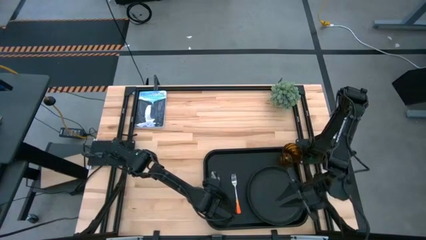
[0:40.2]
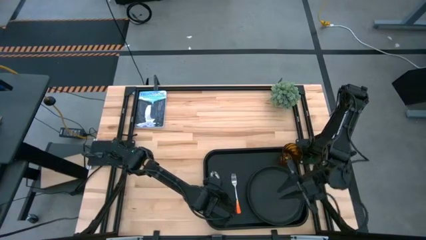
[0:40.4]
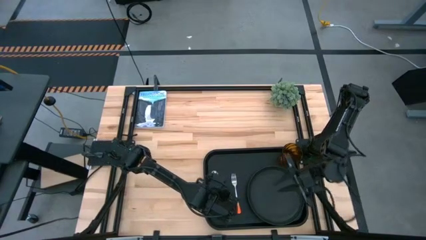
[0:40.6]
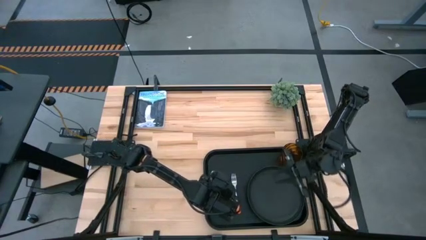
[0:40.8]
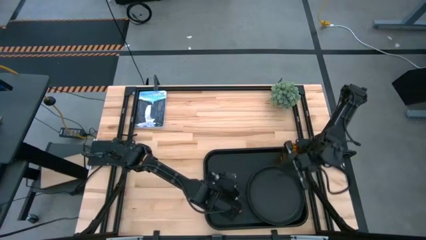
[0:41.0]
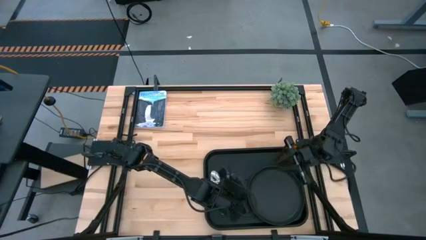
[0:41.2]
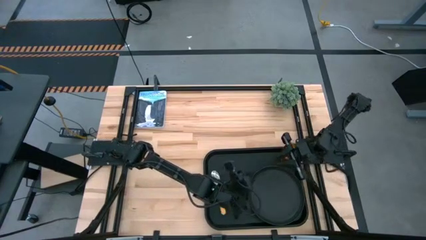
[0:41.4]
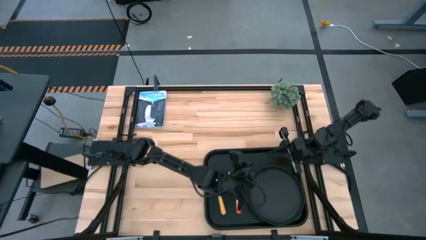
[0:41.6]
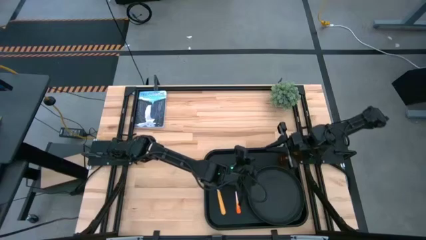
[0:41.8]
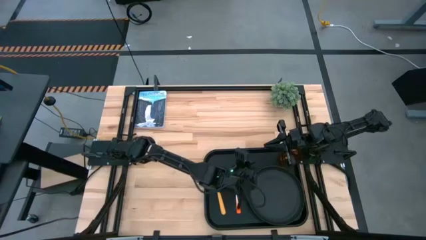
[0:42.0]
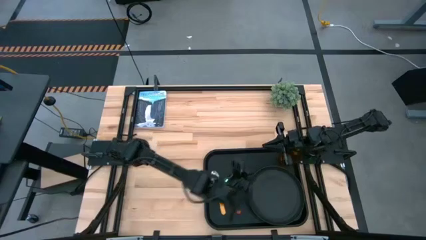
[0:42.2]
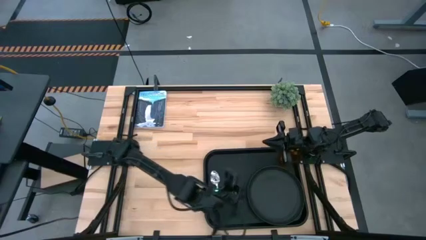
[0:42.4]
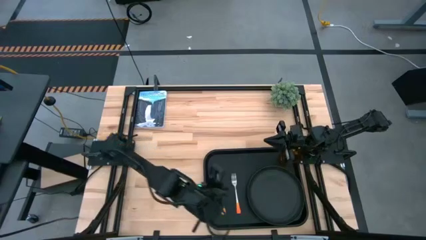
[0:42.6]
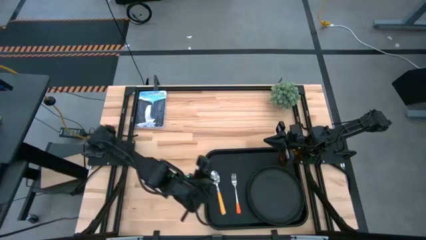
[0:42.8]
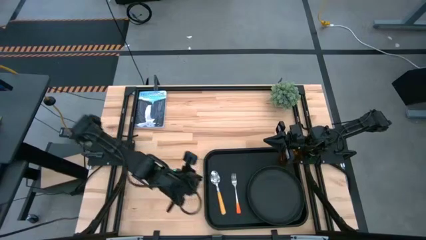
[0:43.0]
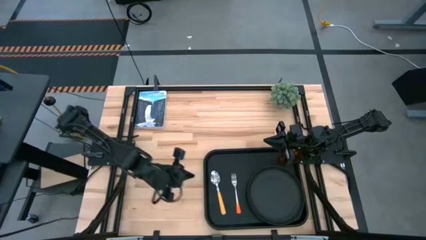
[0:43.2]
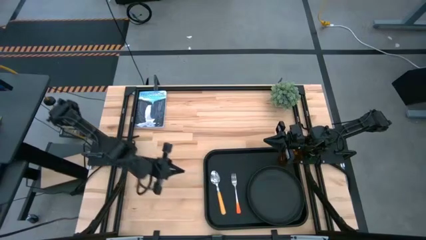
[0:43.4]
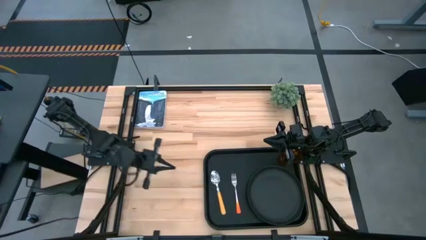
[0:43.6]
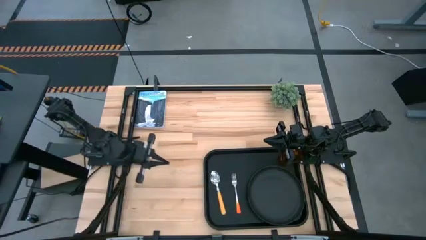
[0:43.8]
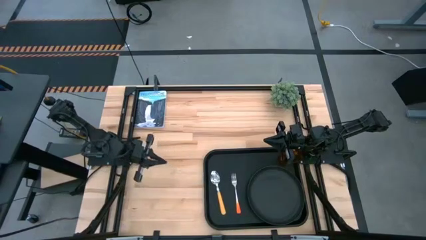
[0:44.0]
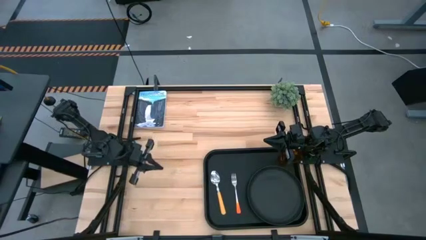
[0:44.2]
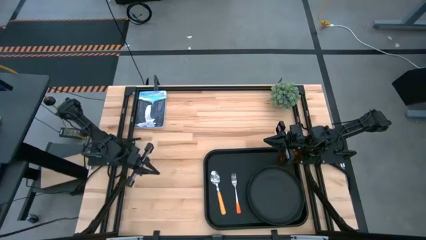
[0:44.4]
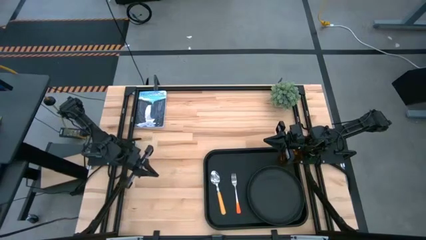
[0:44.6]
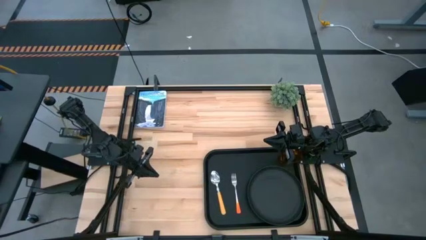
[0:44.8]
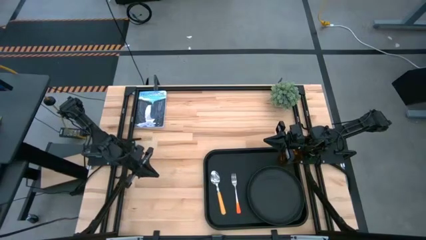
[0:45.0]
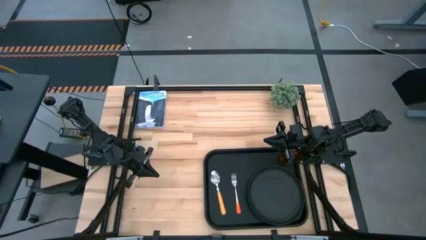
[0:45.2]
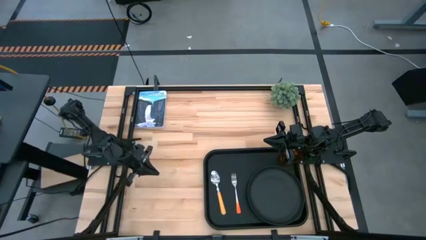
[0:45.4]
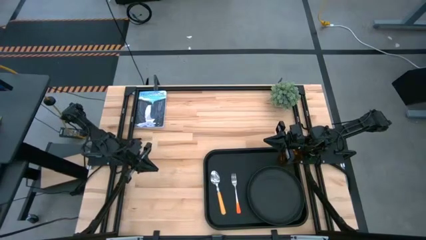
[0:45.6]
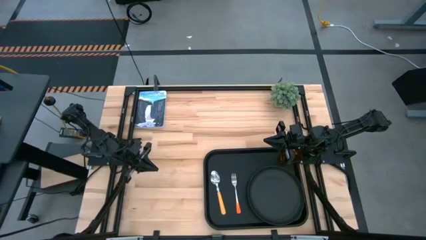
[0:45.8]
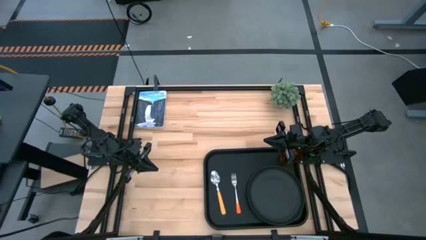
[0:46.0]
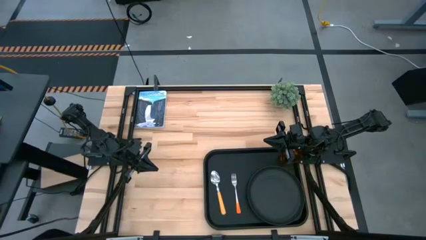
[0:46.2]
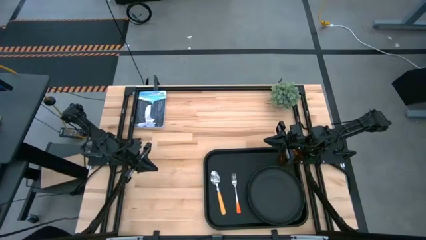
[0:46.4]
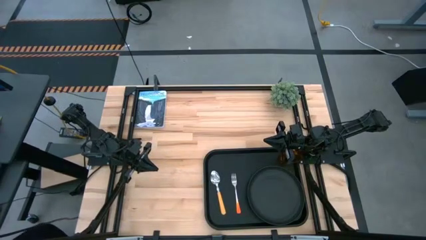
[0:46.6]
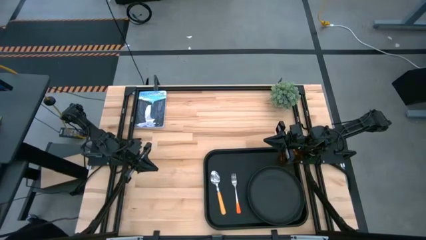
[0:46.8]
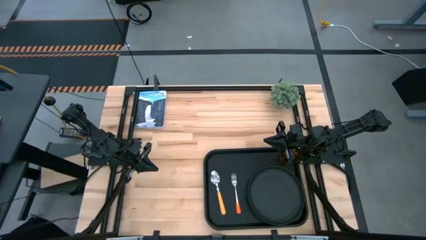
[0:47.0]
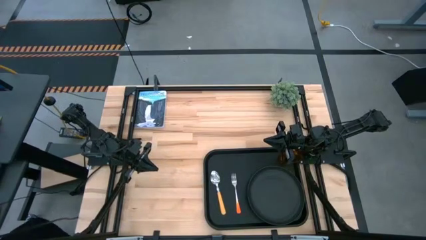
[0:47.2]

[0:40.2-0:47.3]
Task: Pick and place plate/cup/fork/spoon on tray
Return to Home Position

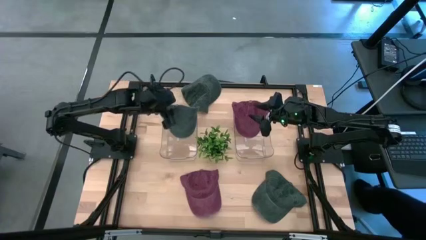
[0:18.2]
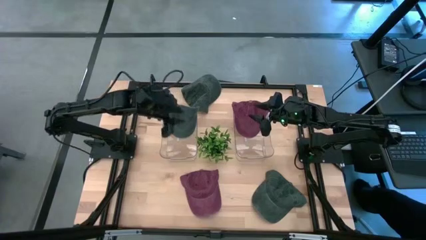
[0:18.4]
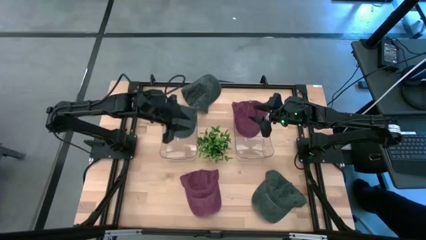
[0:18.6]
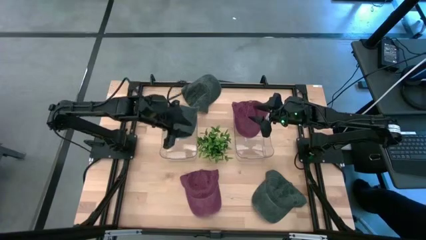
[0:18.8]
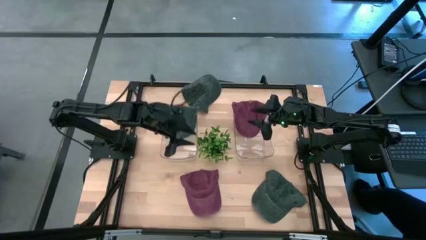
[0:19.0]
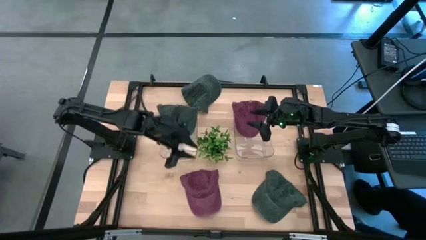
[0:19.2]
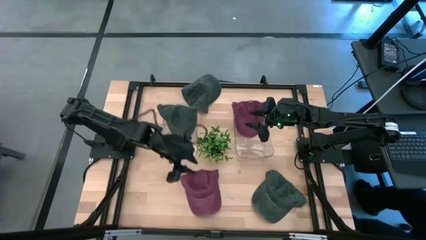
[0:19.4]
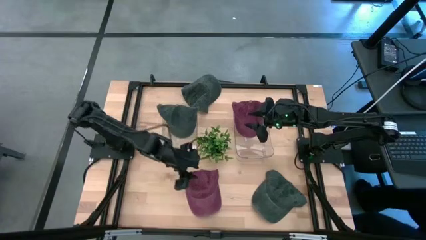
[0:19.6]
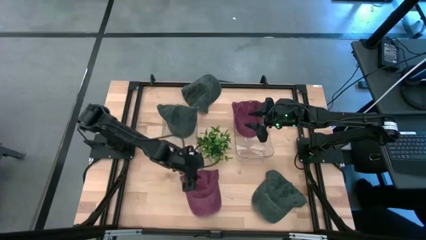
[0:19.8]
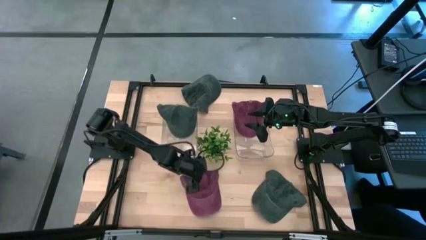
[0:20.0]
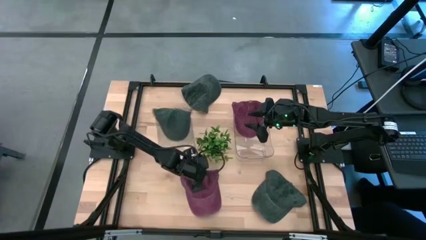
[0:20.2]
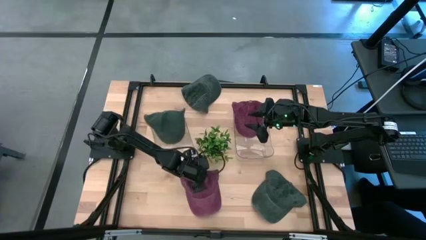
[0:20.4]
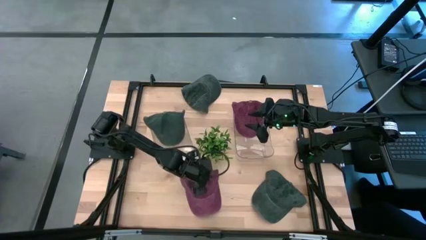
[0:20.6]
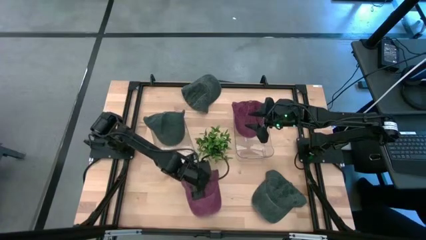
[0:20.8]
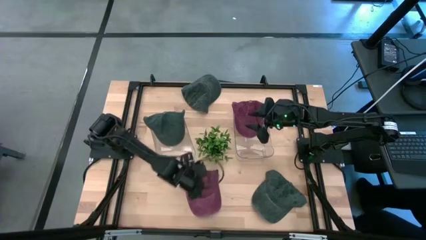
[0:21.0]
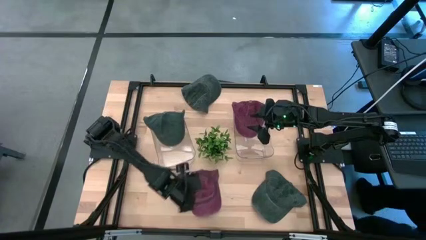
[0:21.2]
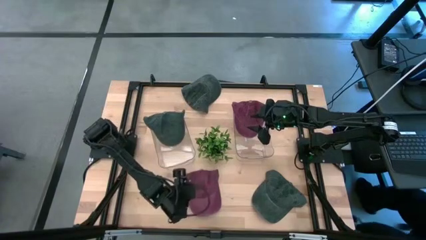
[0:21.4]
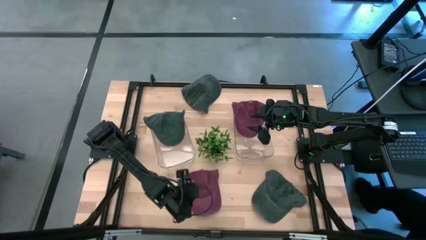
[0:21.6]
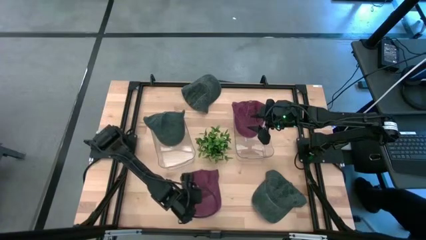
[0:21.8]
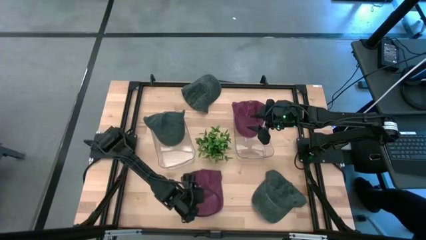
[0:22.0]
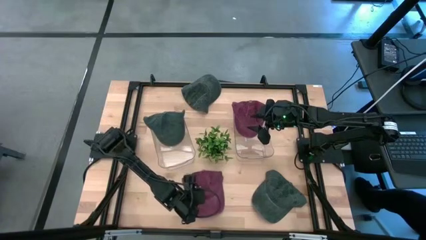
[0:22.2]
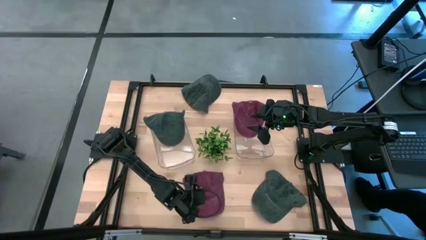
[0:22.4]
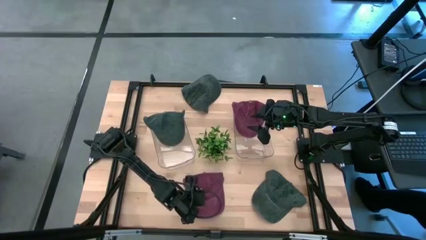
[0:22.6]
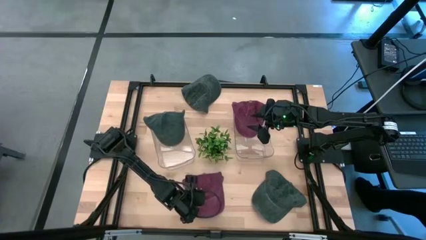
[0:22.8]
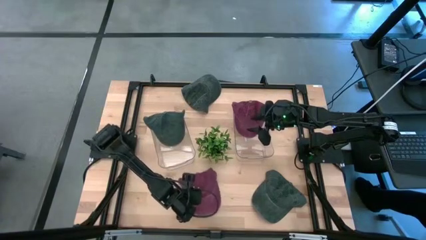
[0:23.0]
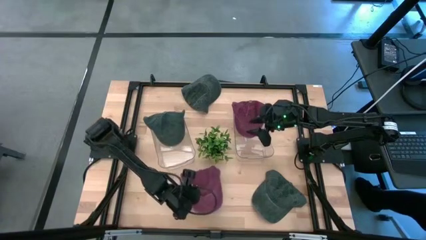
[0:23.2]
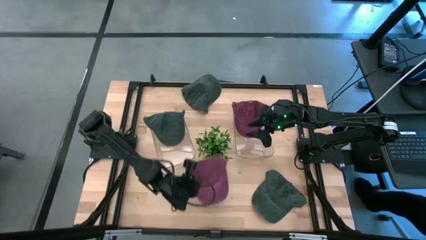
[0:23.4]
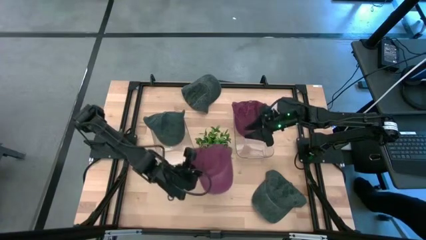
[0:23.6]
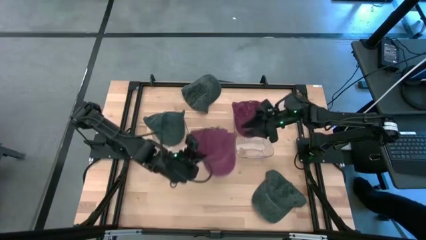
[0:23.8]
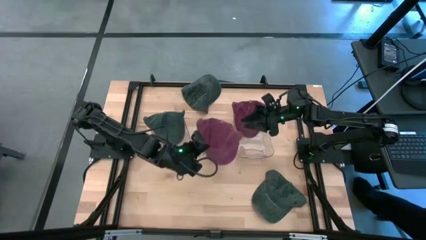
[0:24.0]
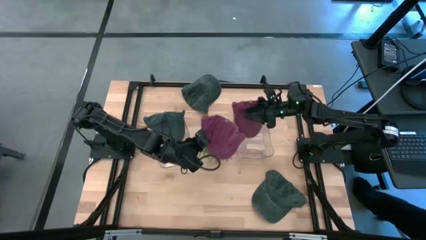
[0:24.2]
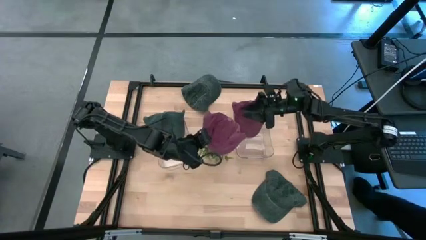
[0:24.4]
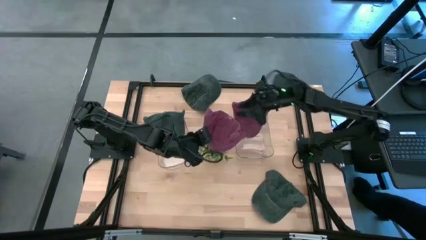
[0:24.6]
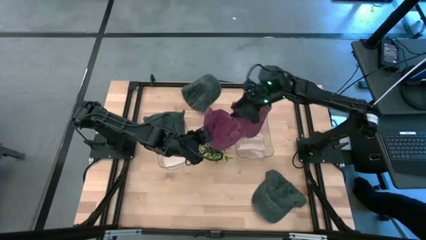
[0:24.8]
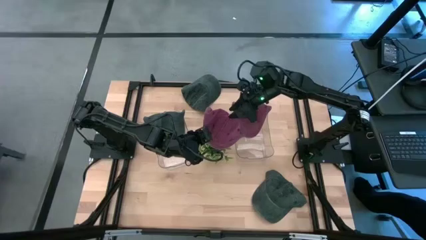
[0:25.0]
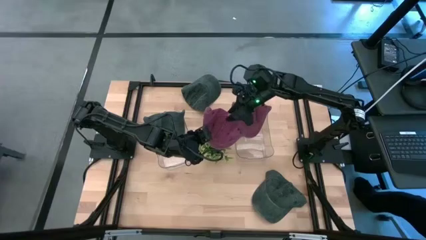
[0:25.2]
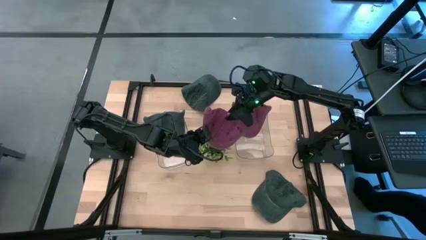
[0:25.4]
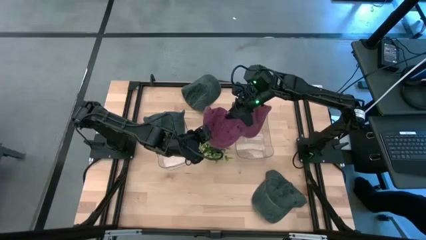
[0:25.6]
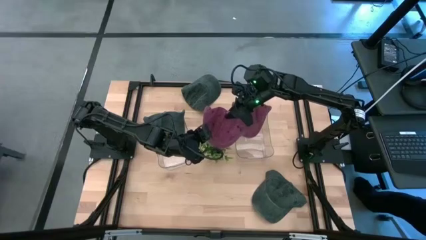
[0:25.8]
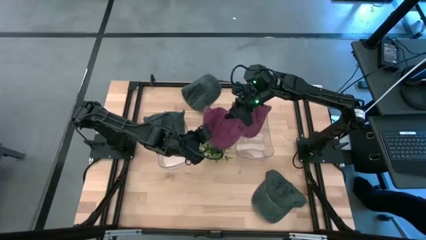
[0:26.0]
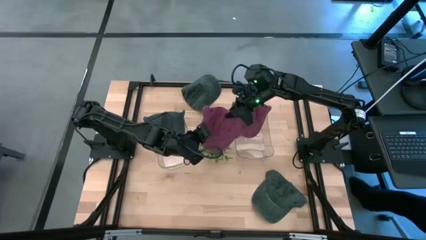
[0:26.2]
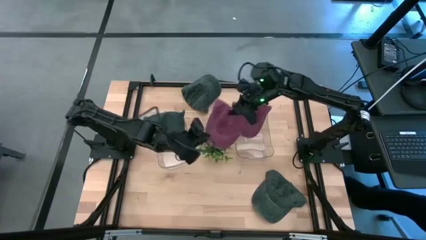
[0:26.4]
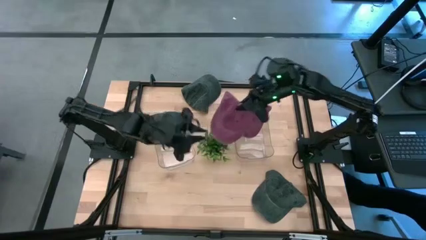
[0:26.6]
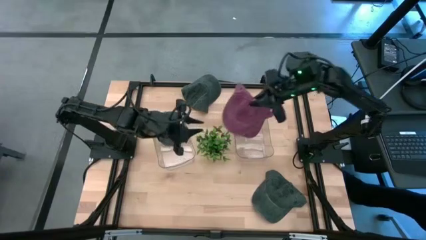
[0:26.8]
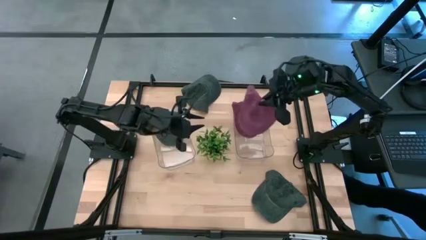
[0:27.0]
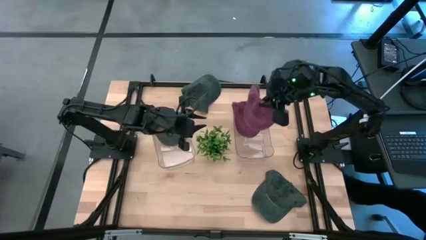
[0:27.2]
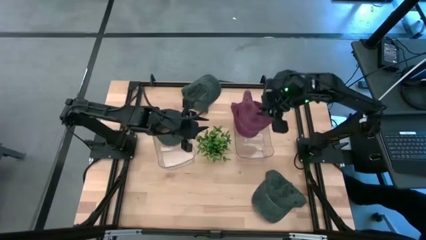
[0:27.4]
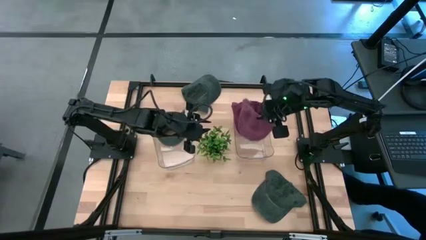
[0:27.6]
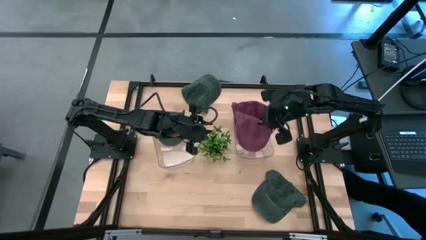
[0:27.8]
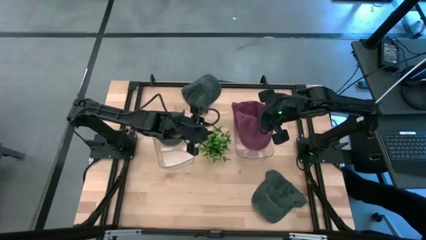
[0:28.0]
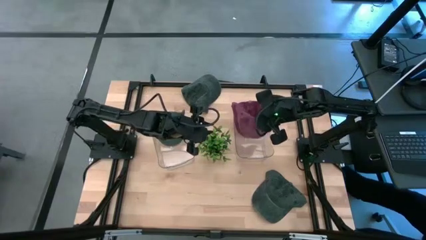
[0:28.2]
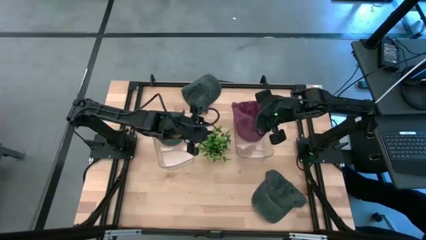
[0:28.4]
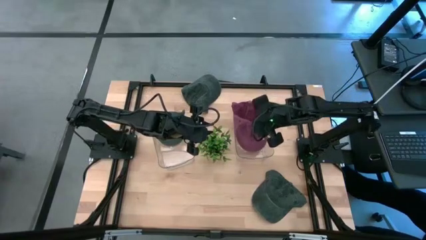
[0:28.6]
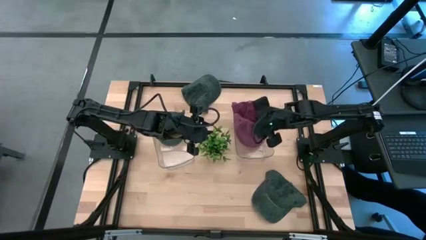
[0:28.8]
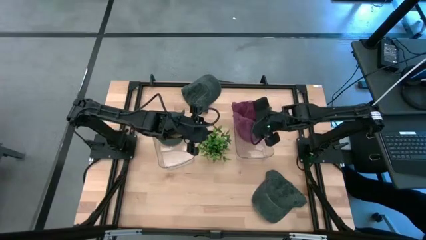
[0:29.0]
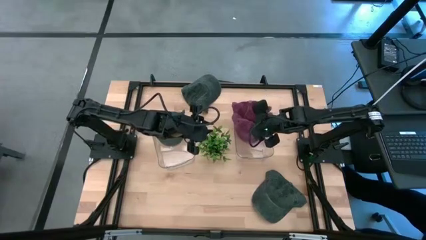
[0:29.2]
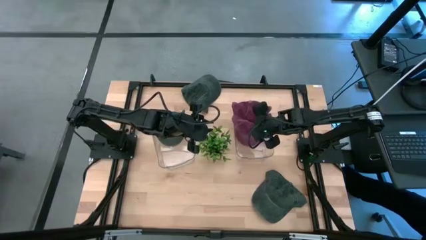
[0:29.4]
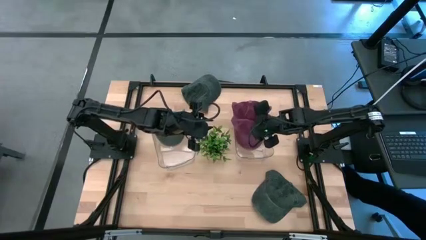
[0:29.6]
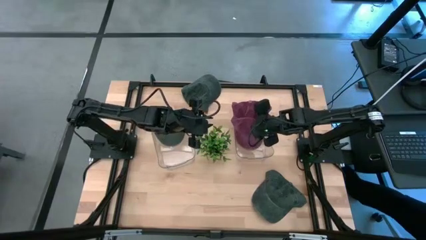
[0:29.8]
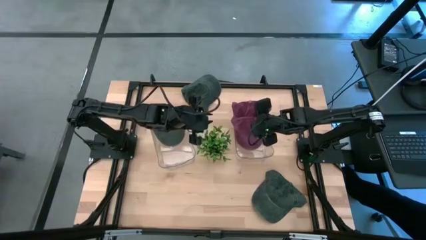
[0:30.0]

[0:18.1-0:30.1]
Task: Pick & Place hat
Put the red cap into the right transparent bin
